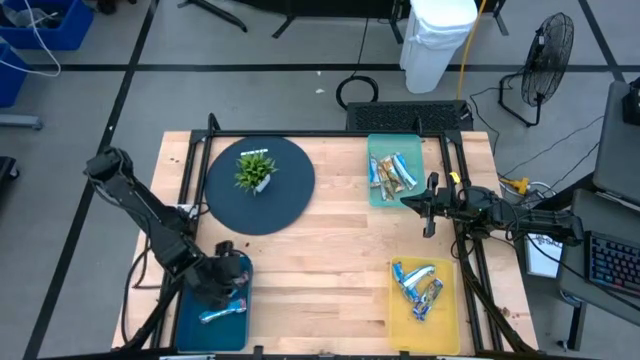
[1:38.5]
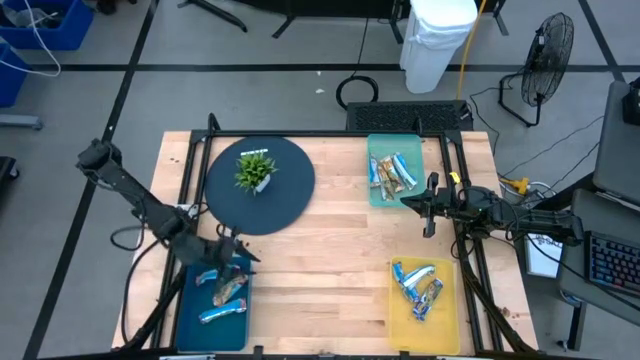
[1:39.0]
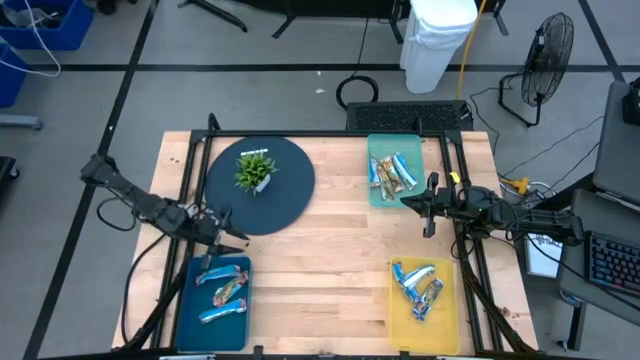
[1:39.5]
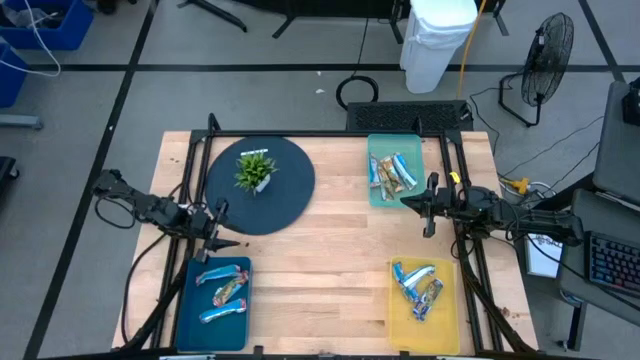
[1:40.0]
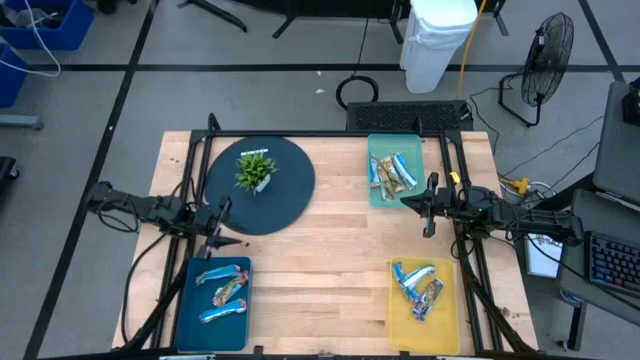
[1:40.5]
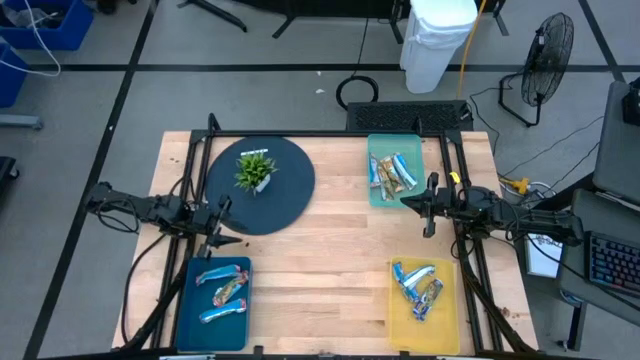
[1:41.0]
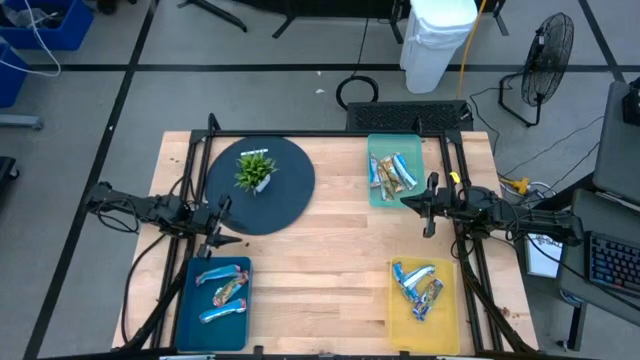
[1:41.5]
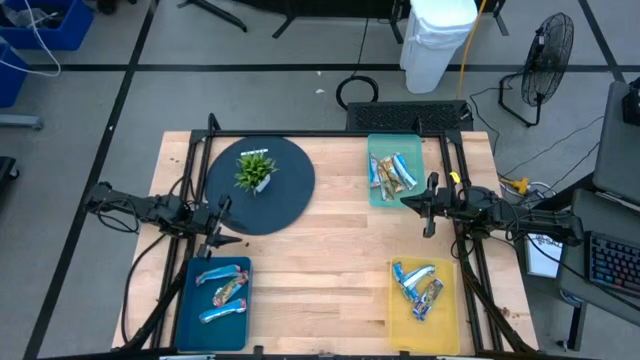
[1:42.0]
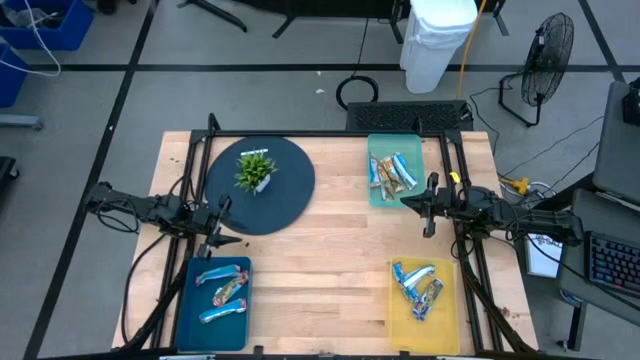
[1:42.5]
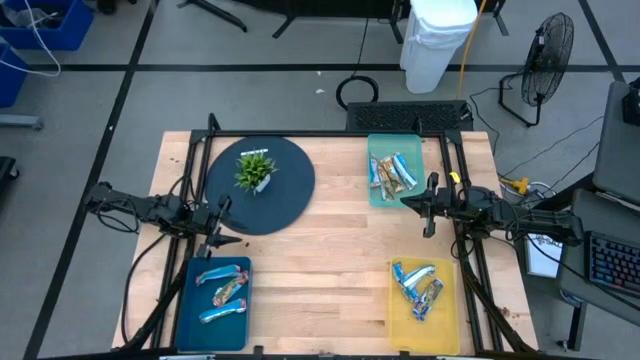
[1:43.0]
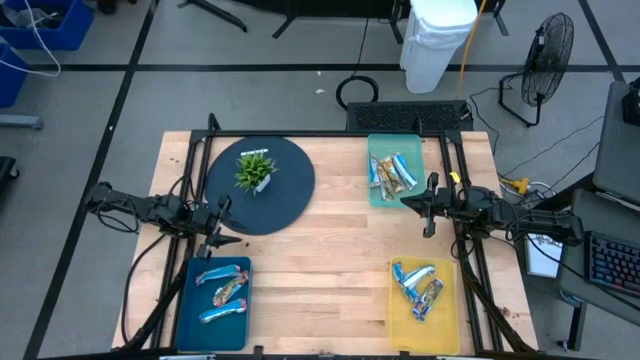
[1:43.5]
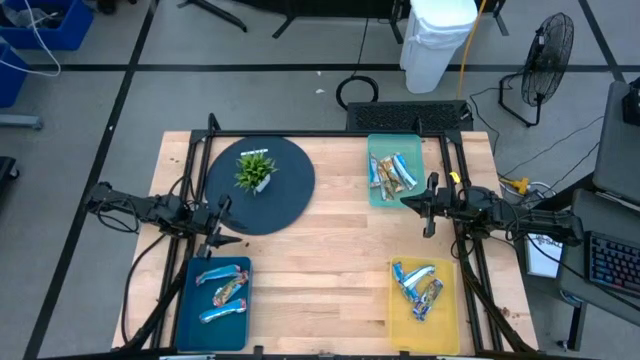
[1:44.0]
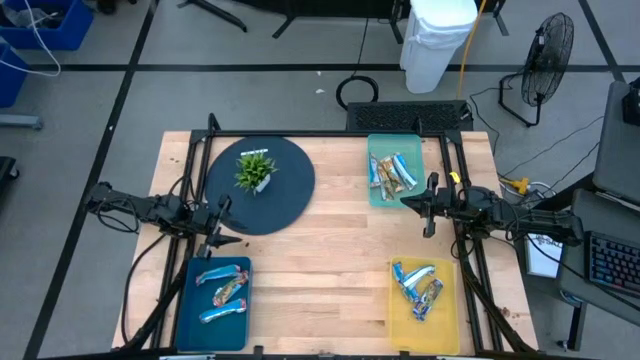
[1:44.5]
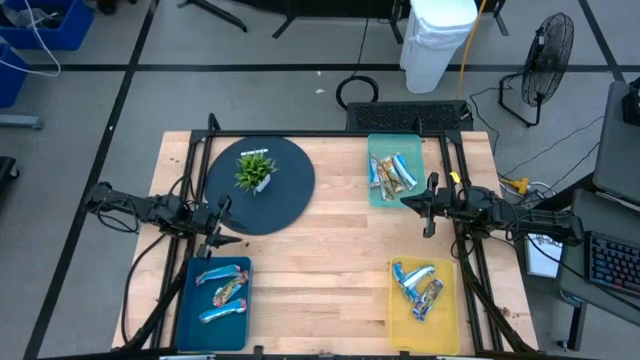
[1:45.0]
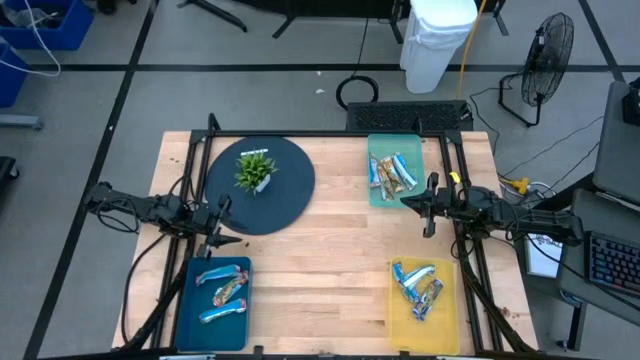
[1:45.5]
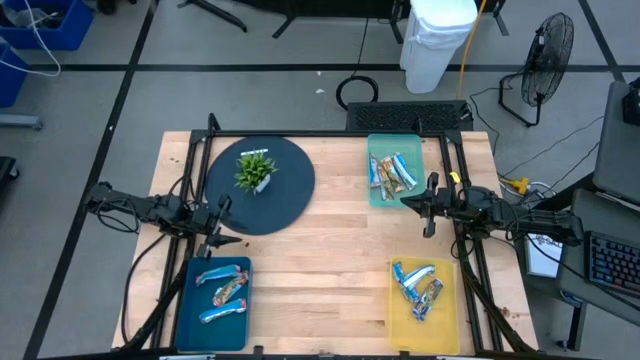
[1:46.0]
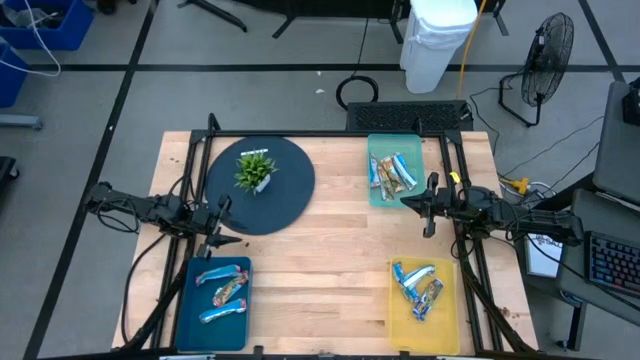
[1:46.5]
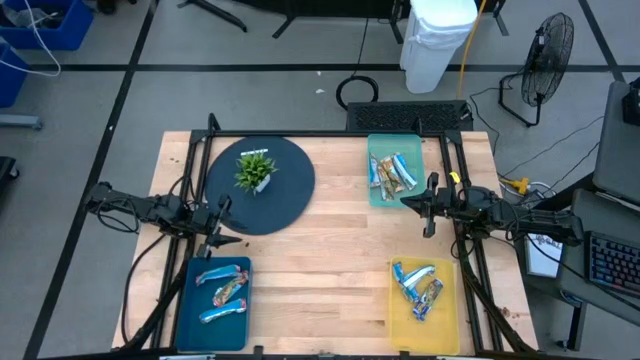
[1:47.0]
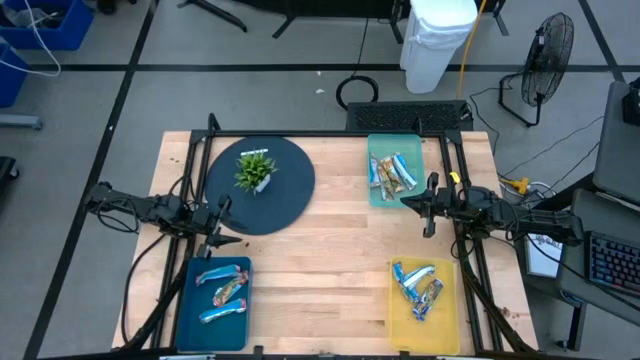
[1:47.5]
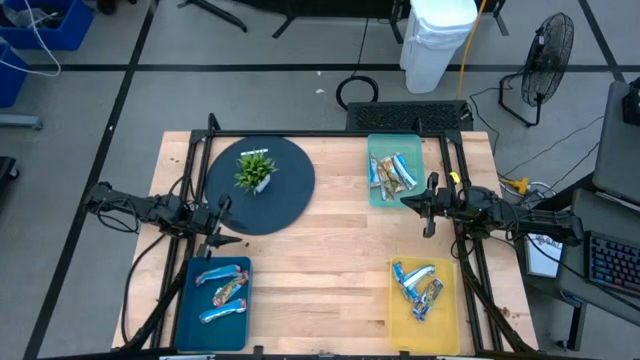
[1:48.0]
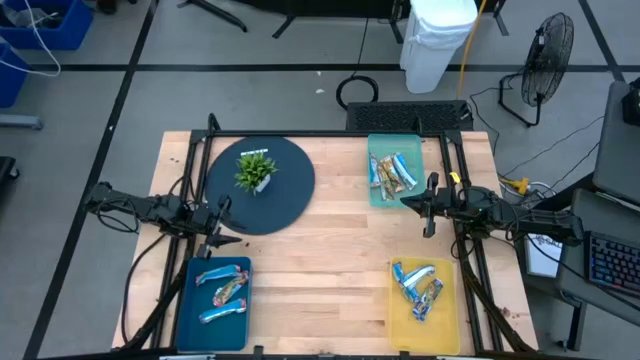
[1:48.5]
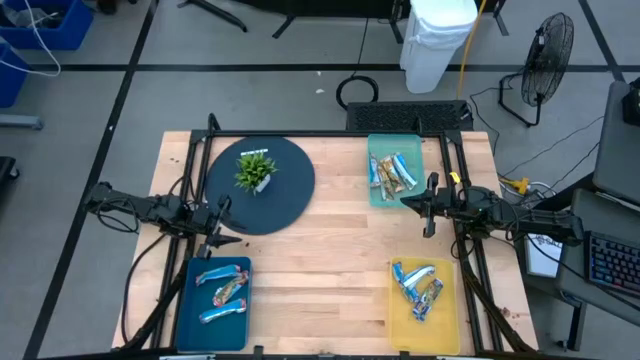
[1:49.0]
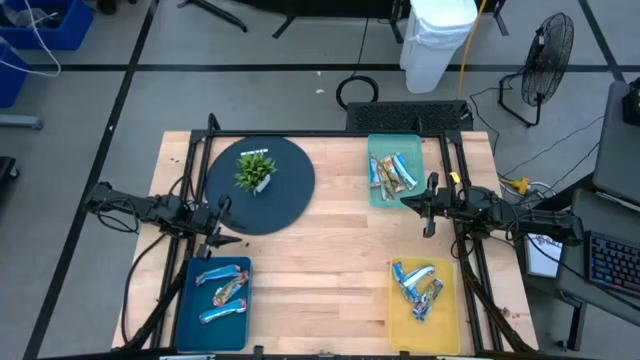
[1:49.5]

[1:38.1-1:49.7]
Task: Pick and place Granola Bars by type
Return to Home Position
